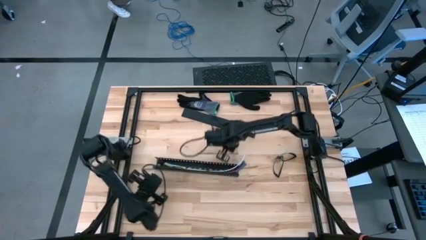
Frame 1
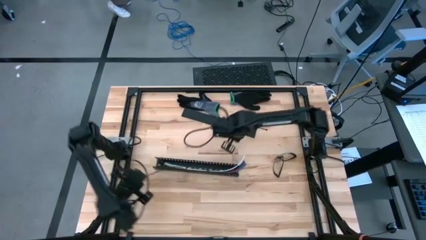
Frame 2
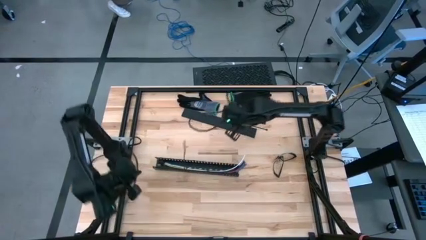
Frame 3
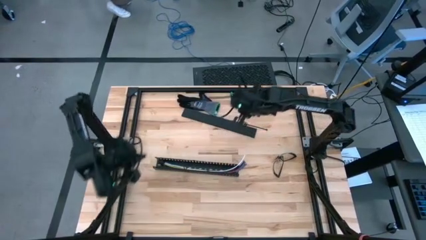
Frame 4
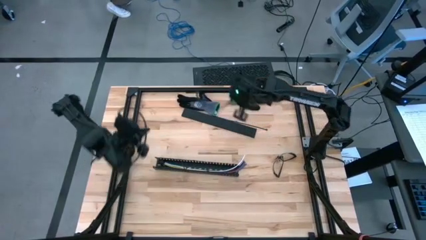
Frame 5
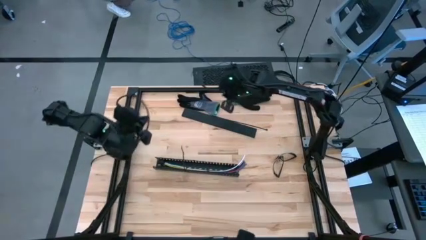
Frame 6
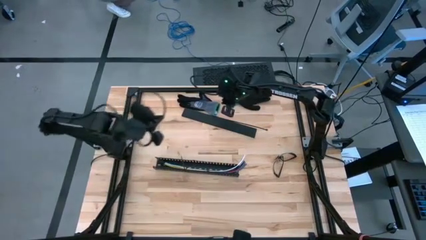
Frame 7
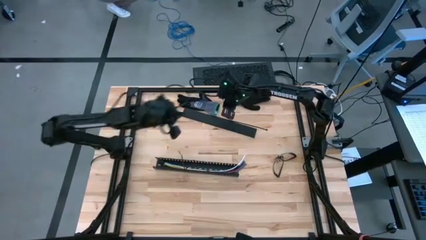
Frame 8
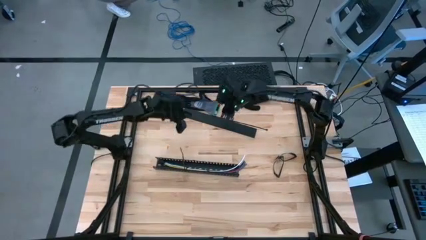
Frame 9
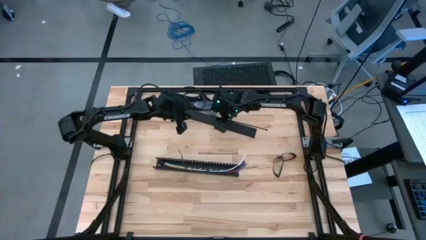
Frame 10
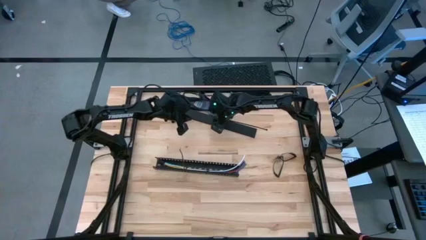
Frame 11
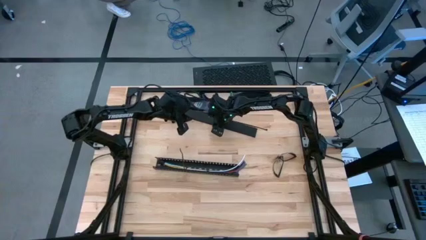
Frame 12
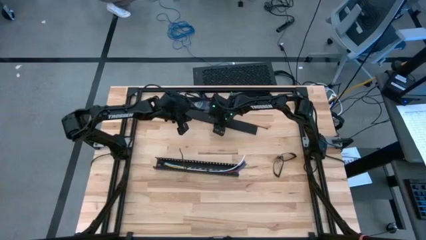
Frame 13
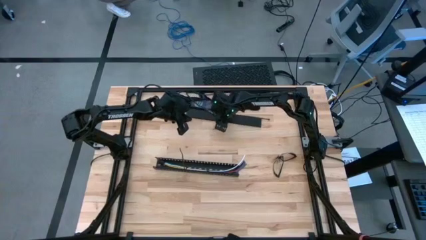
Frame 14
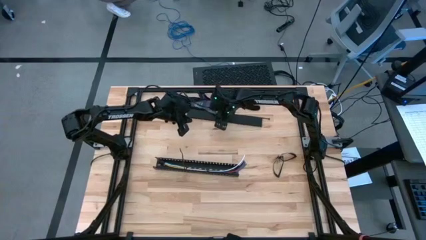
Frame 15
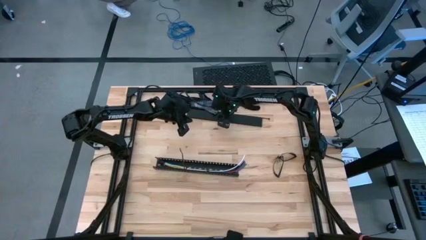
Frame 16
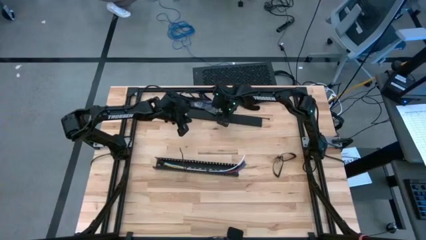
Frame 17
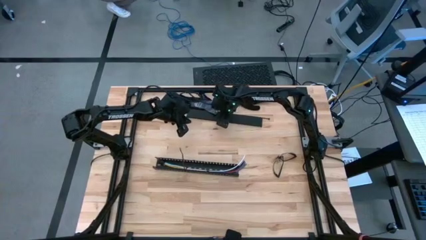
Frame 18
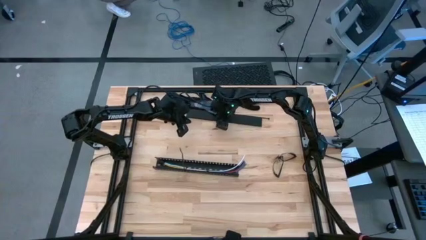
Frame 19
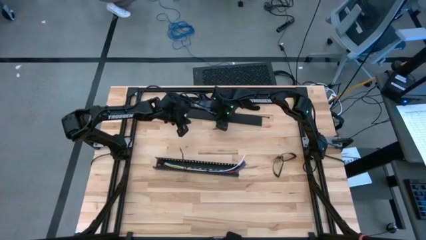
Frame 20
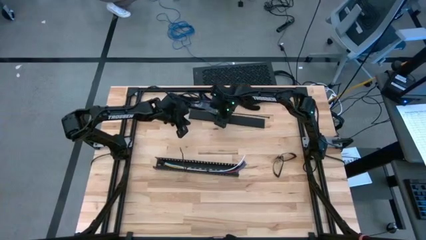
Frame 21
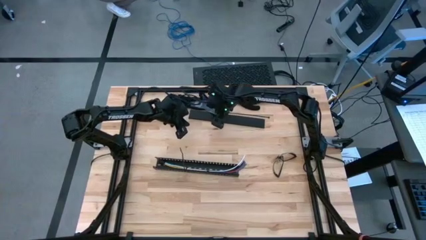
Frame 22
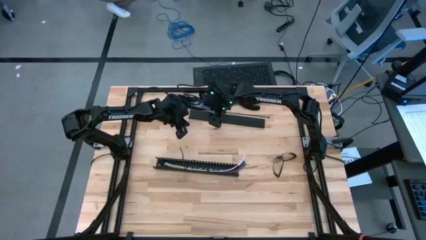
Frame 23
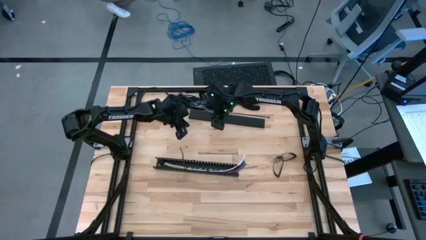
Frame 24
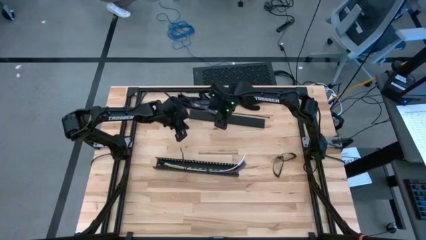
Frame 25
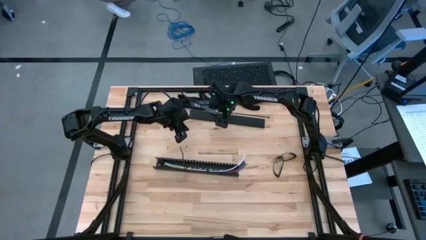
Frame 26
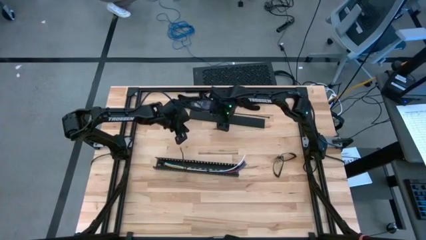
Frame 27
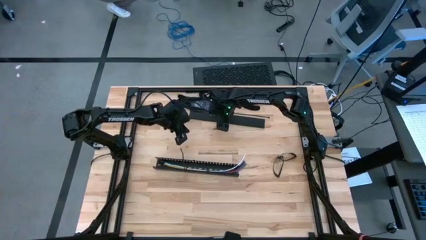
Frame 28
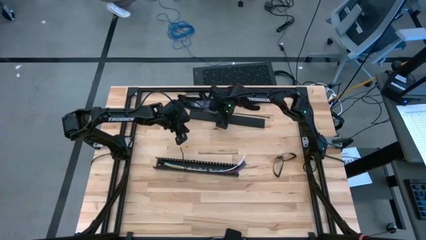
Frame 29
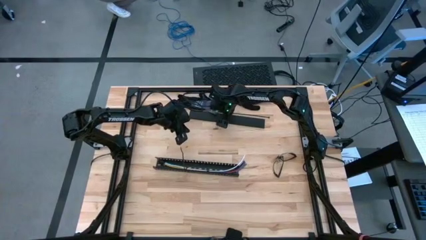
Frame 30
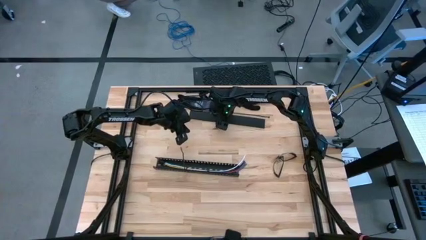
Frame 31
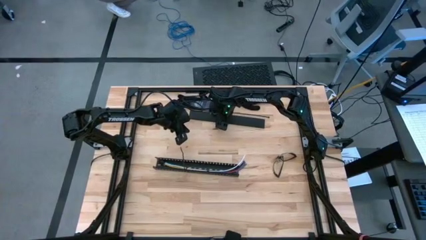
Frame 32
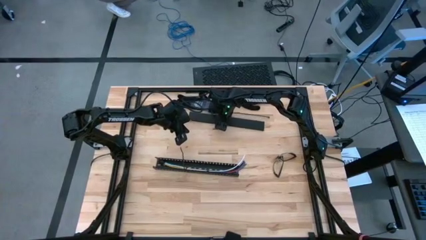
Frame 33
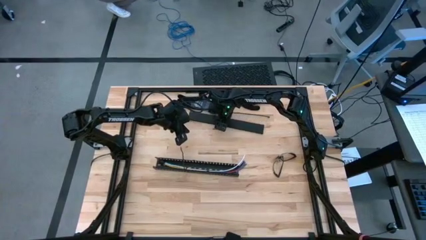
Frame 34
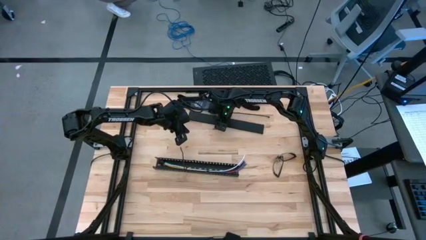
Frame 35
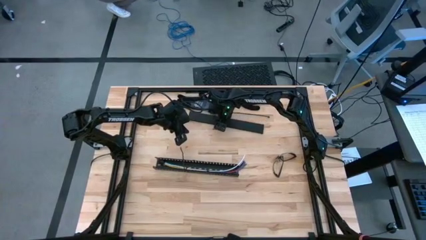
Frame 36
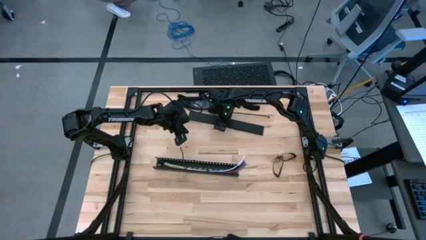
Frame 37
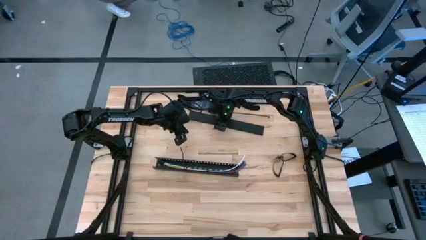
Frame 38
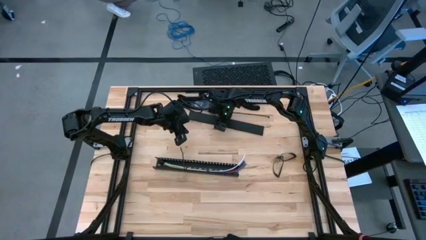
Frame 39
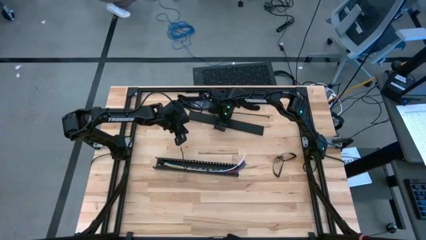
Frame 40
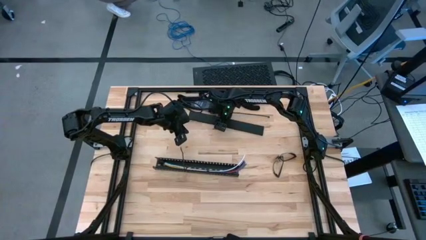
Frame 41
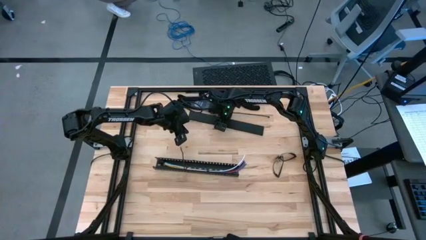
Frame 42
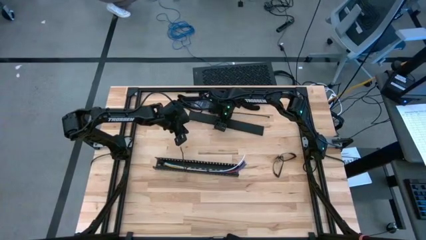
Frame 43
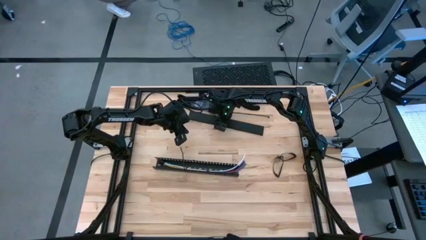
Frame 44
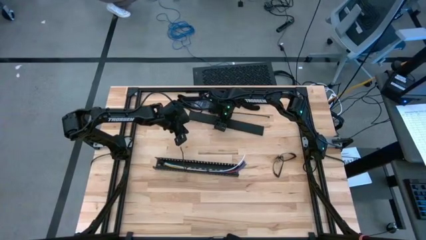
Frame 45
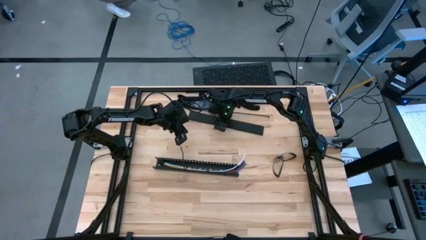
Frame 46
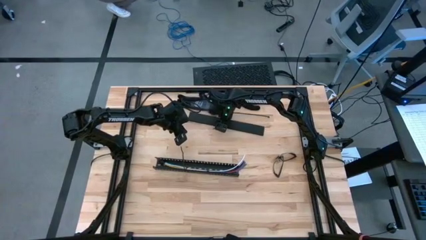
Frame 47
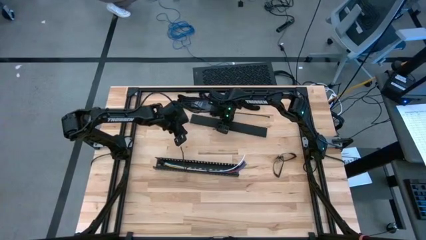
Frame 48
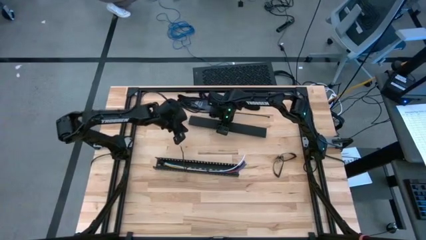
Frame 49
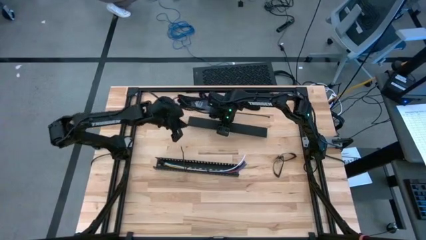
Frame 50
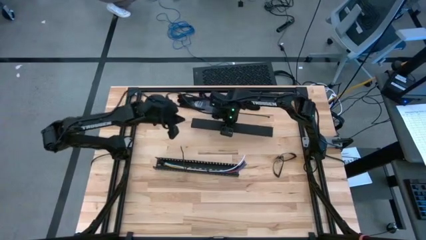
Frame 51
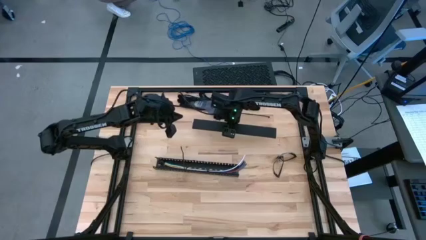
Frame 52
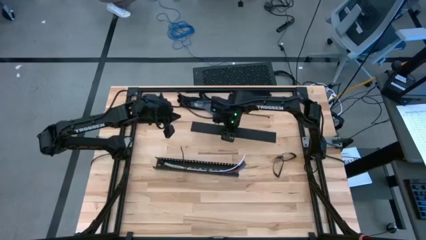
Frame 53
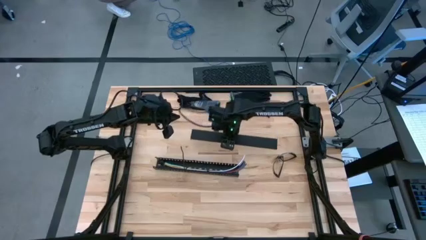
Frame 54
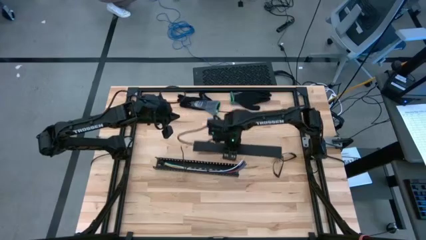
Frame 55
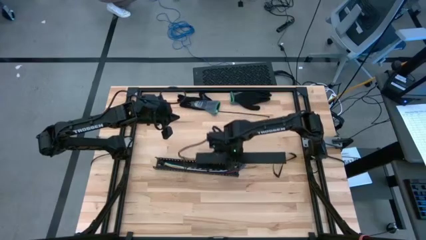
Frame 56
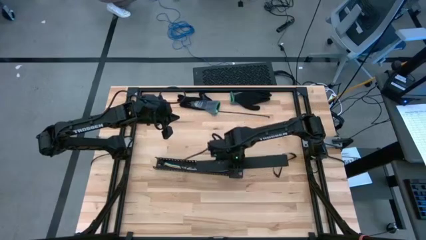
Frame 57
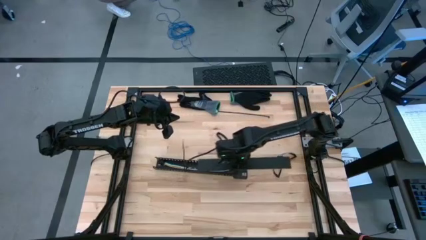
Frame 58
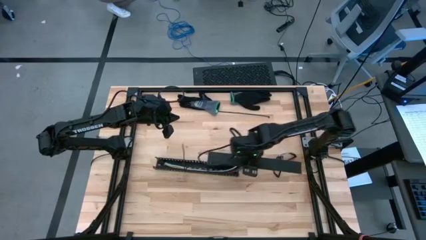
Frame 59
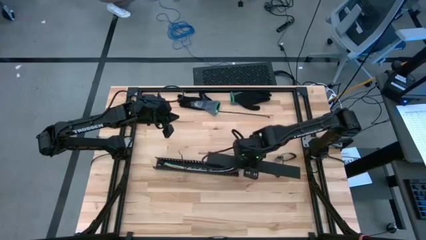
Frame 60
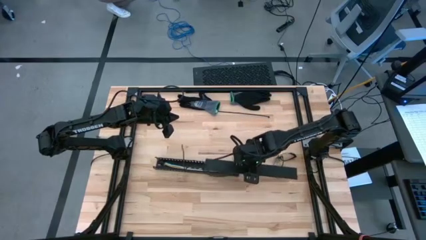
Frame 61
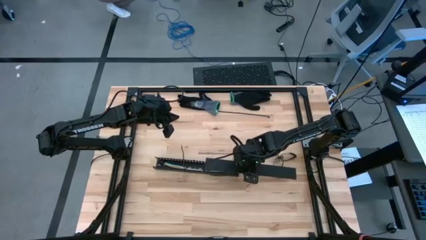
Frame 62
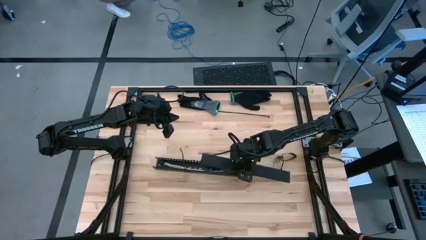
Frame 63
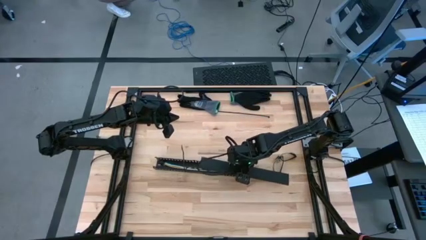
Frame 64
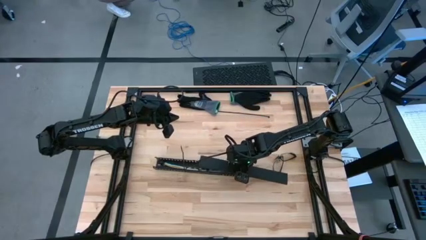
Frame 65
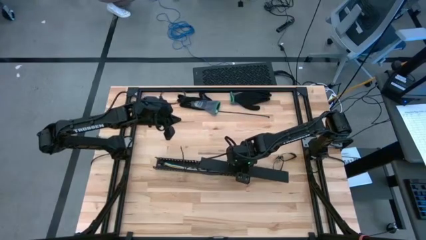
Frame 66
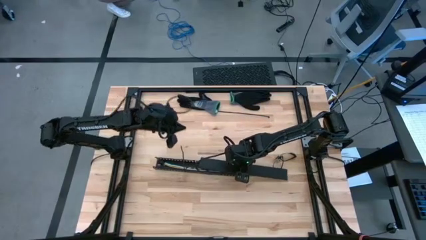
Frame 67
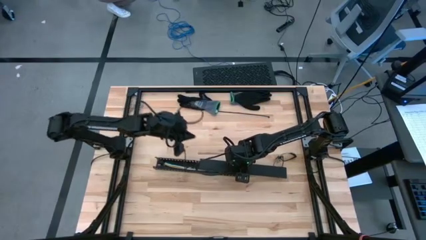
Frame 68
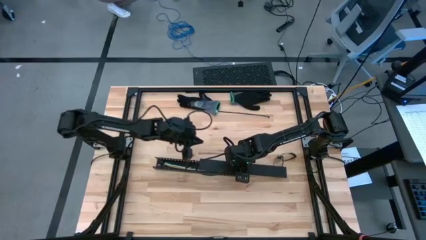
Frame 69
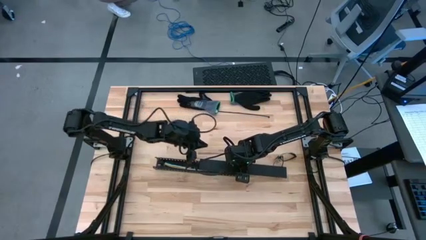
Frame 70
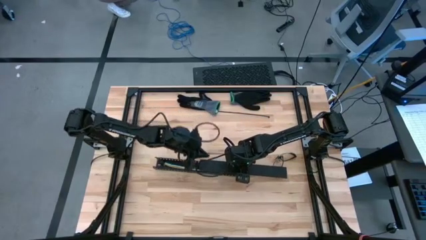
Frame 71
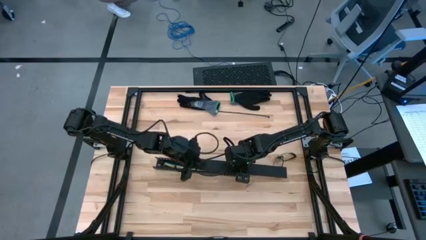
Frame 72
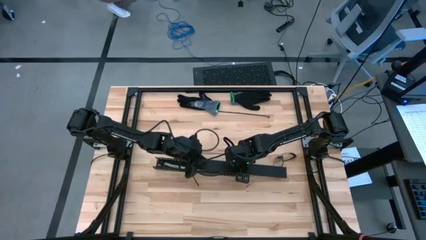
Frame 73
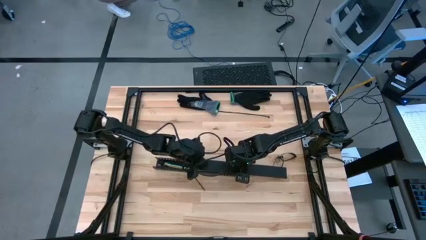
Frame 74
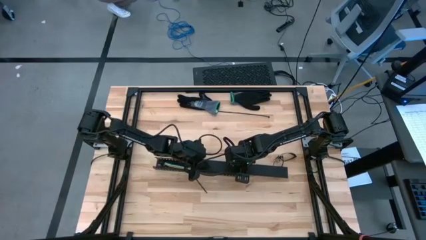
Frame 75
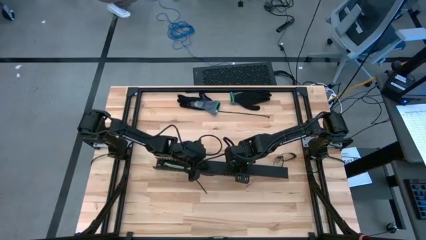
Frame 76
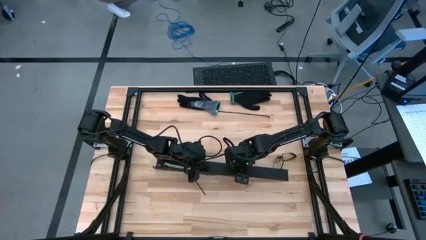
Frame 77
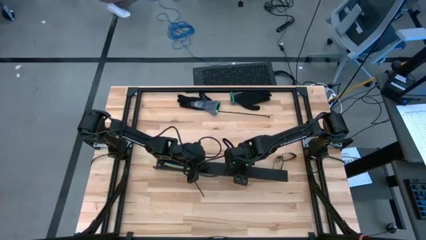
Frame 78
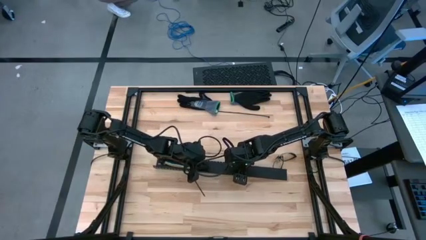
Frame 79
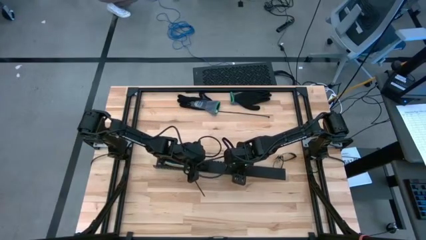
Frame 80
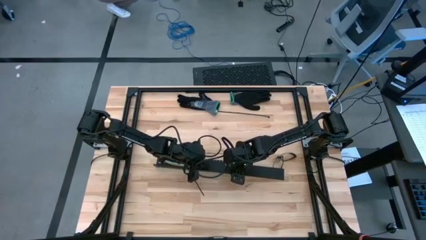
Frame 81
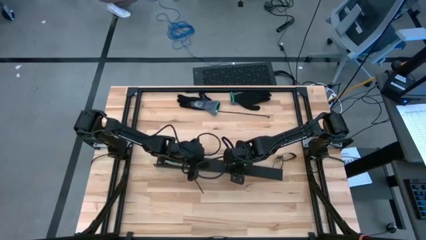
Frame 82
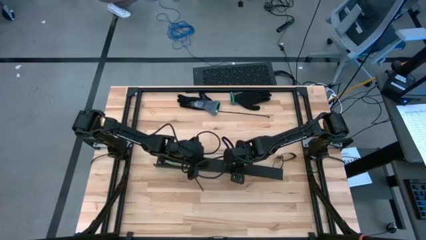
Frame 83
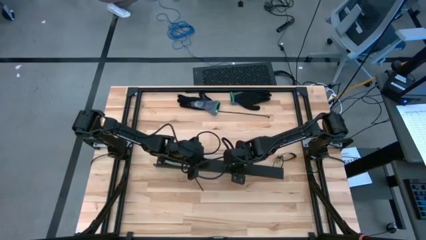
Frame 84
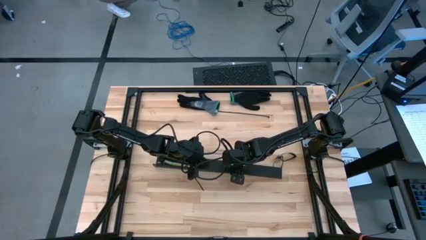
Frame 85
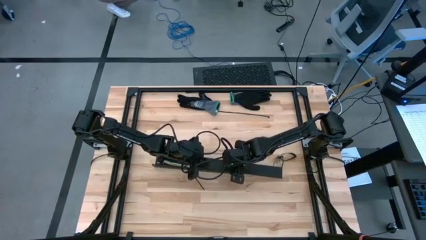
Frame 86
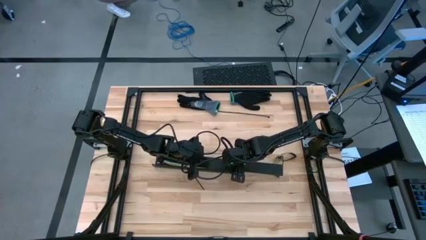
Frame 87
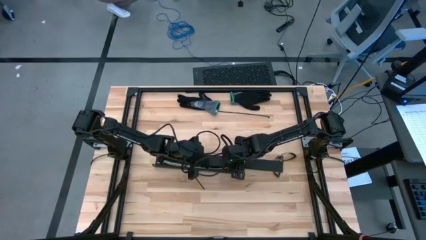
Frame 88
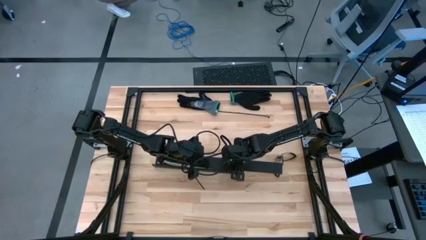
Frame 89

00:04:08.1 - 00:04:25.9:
Task: Ziptie cables
Close the black cable duct
